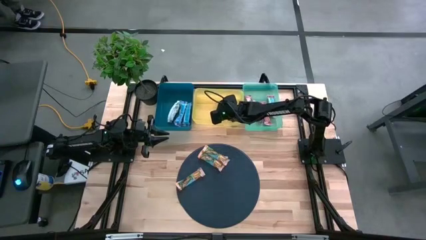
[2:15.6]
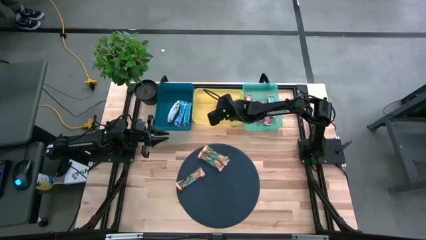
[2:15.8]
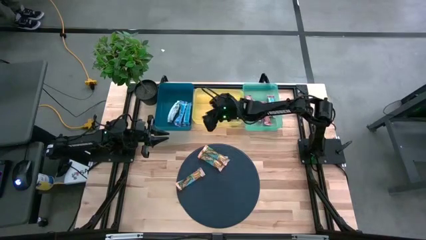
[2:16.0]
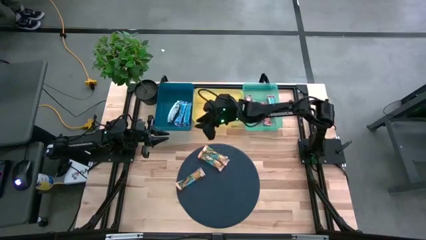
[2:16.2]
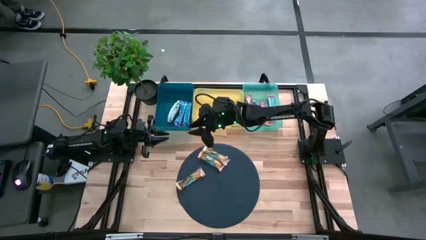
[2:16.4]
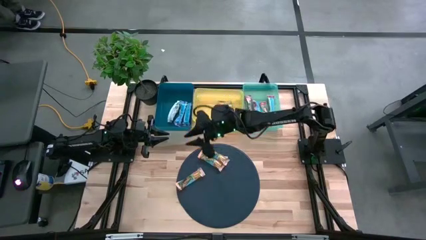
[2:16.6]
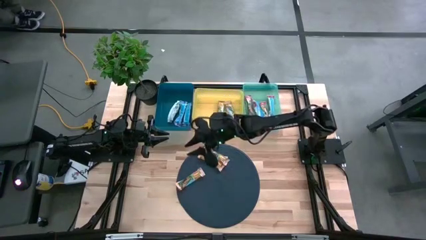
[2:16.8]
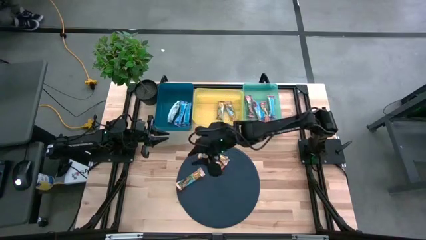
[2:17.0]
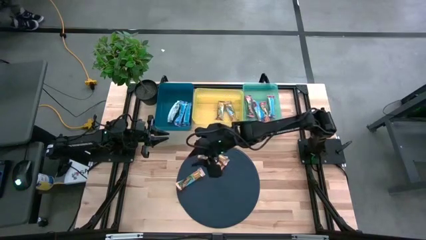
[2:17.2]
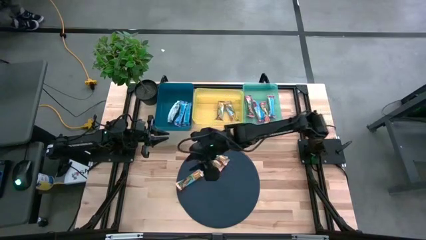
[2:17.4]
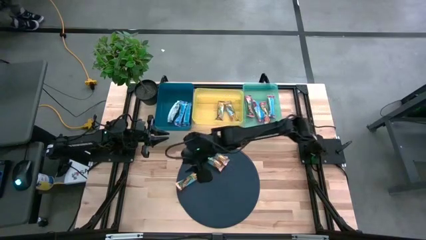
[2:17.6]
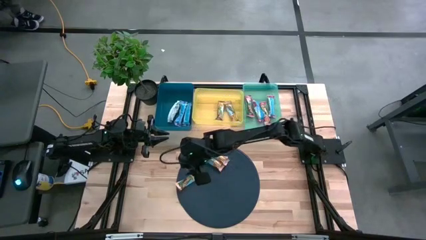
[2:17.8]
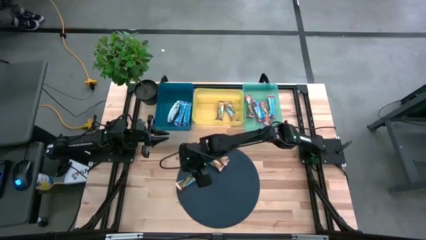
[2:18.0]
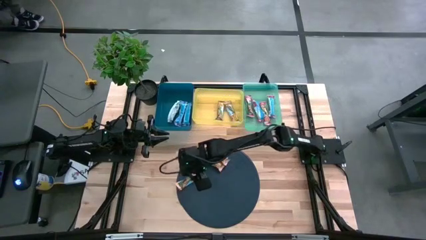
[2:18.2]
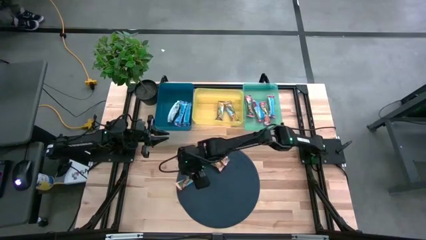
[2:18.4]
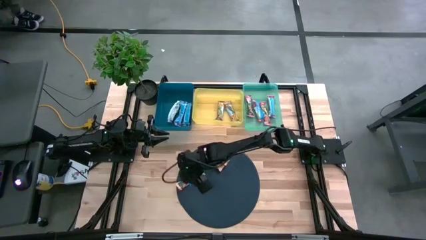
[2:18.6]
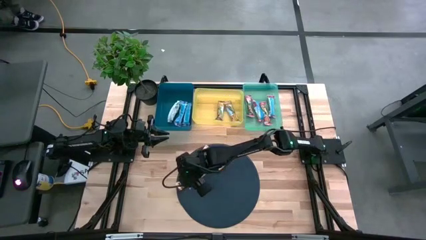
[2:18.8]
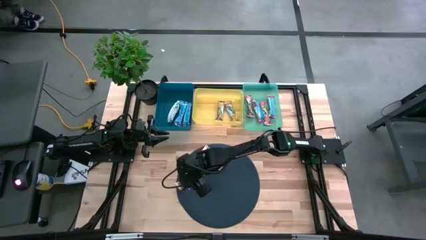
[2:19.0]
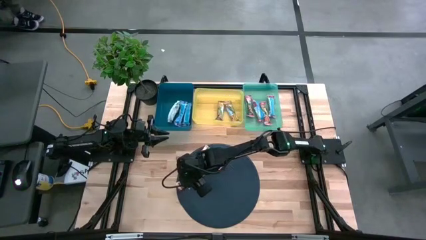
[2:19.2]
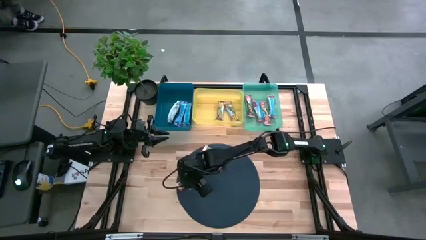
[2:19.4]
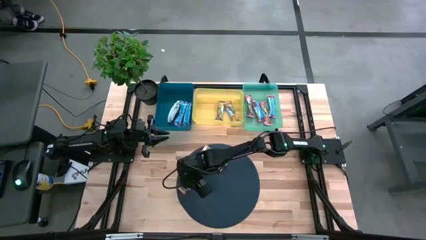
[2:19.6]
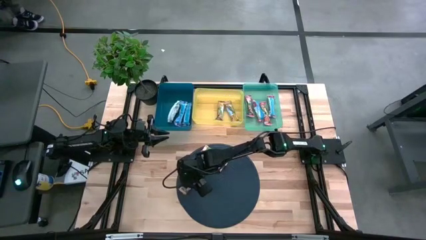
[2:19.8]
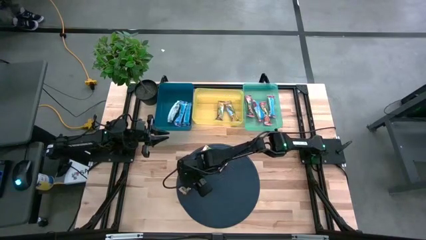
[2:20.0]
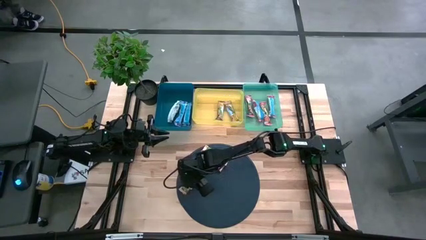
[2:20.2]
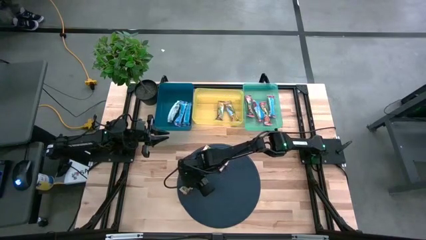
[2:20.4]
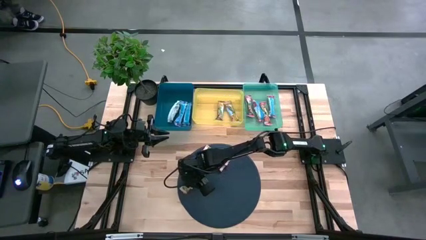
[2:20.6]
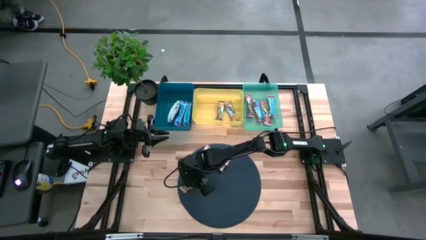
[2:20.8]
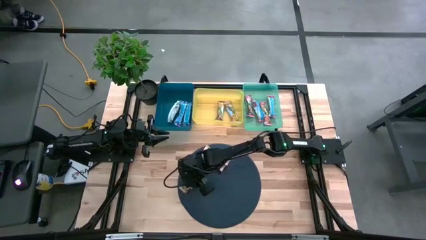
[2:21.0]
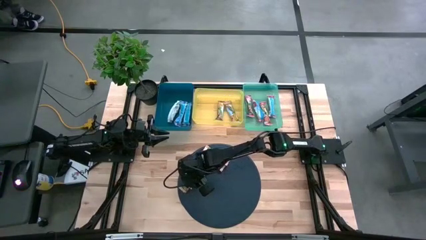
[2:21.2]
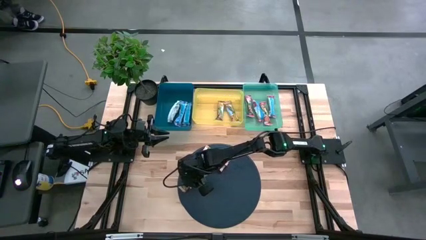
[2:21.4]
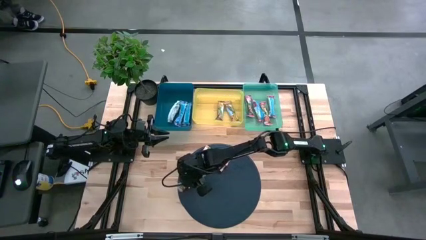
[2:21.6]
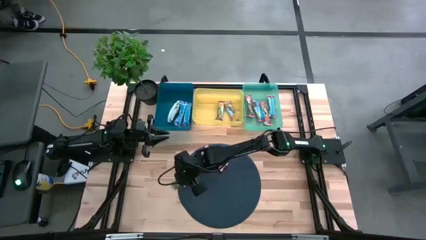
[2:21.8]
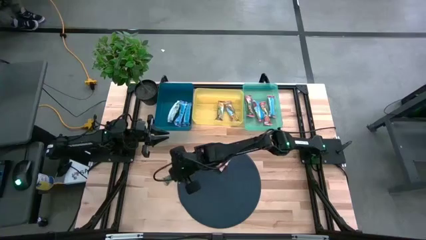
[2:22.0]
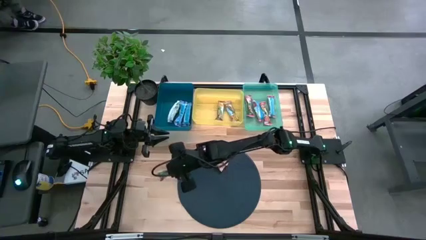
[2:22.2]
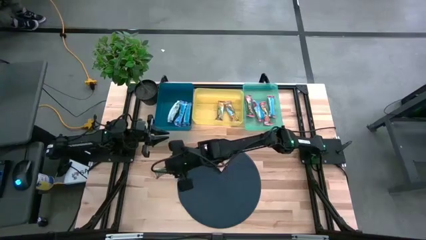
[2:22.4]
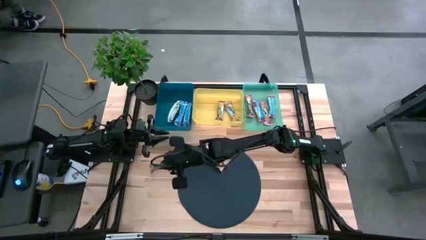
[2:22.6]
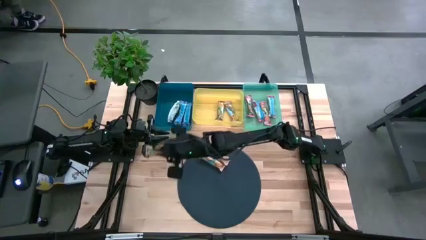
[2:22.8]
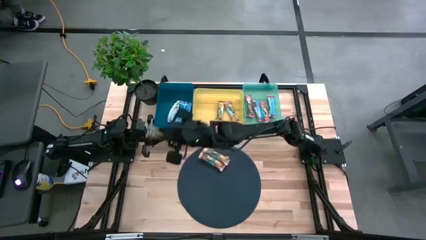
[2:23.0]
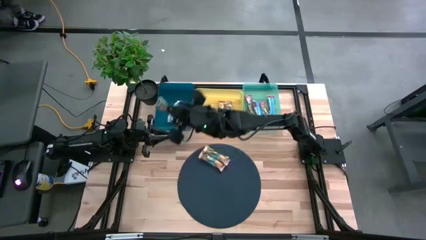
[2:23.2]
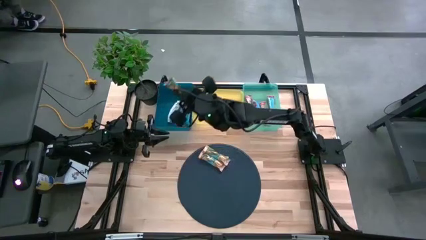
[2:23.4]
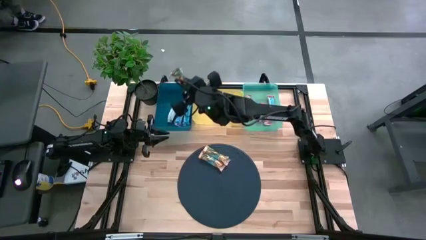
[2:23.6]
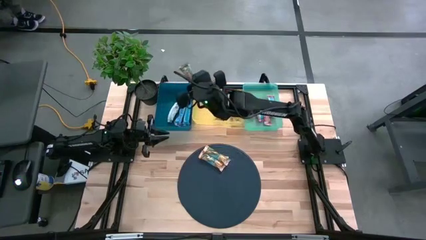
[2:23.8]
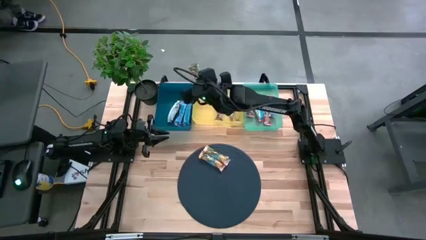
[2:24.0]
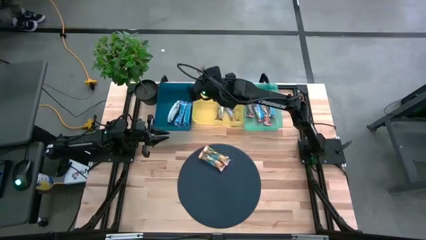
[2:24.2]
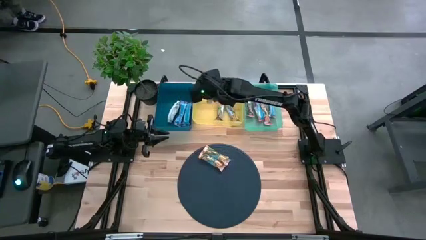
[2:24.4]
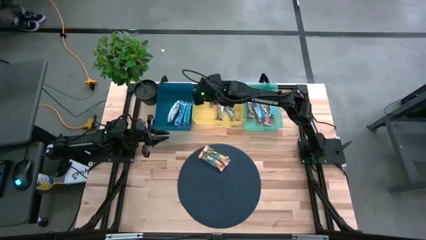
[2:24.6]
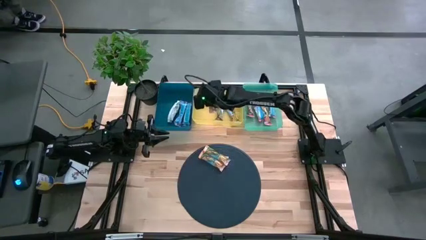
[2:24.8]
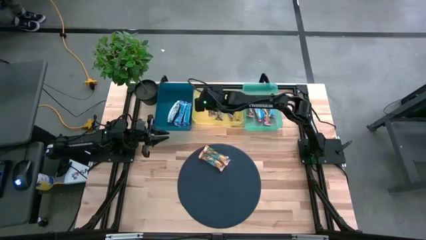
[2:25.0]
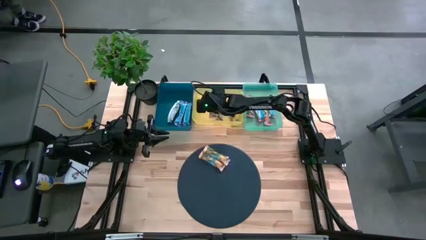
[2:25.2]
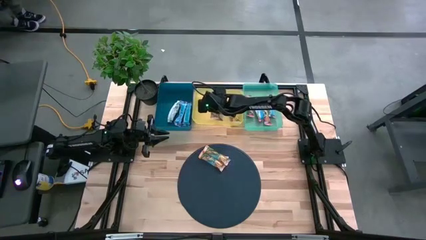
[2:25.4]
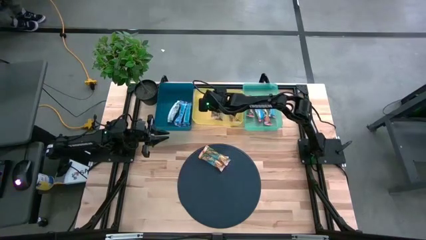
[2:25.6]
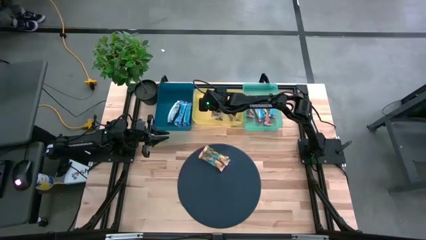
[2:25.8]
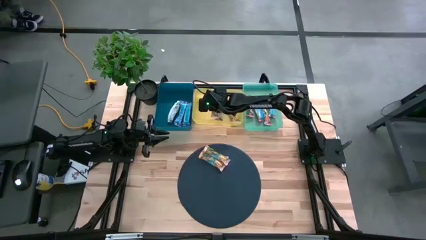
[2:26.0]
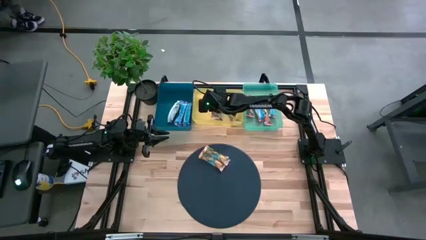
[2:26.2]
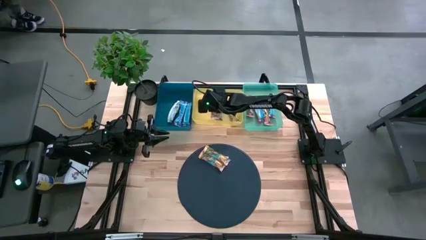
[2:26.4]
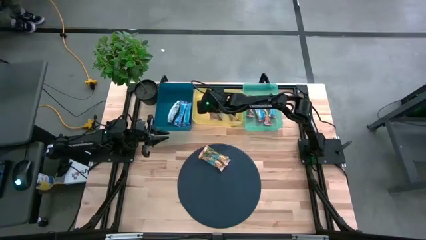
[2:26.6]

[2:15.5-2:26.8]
Task: Pick and place Granola Bars by type
Put the yellow granola bar into the yellow bin
